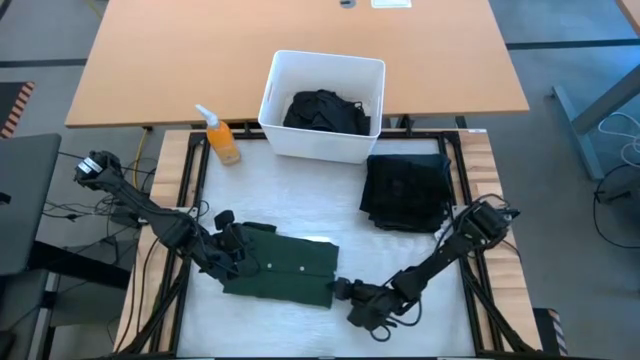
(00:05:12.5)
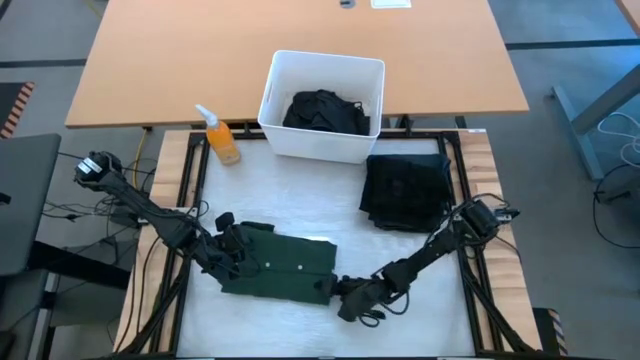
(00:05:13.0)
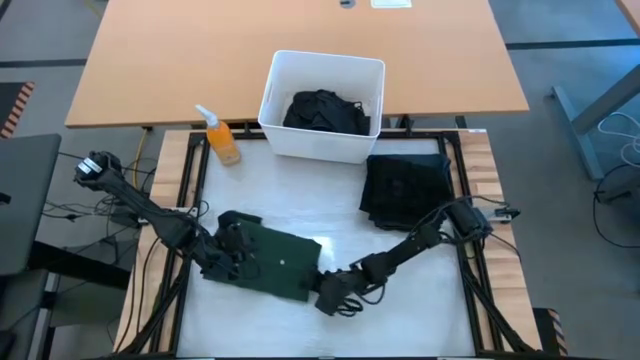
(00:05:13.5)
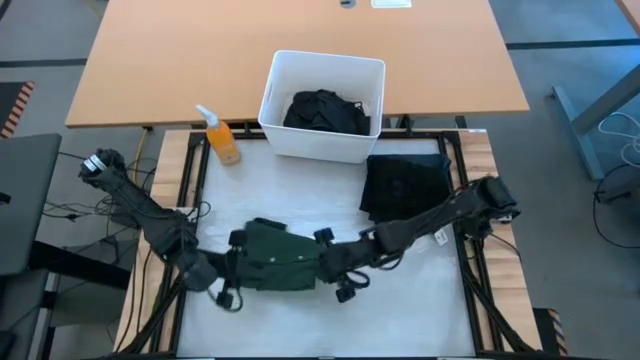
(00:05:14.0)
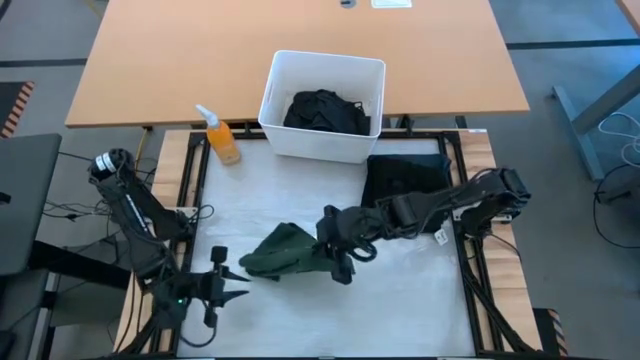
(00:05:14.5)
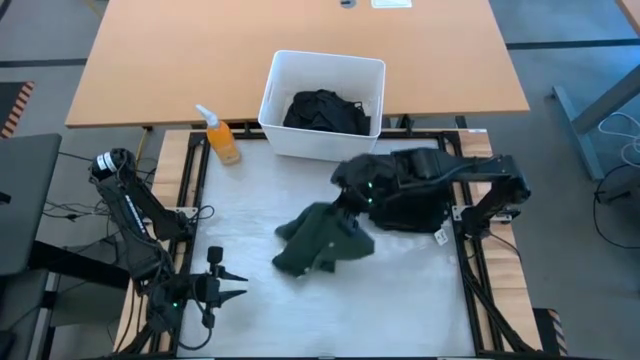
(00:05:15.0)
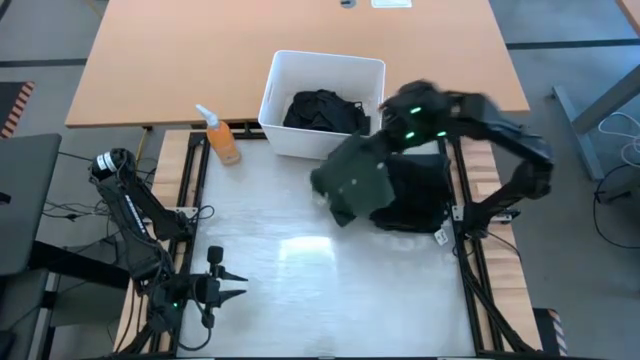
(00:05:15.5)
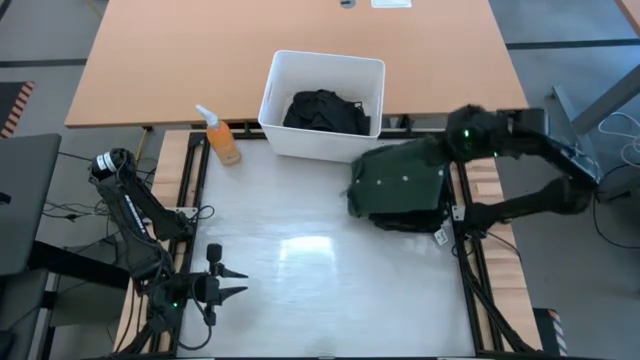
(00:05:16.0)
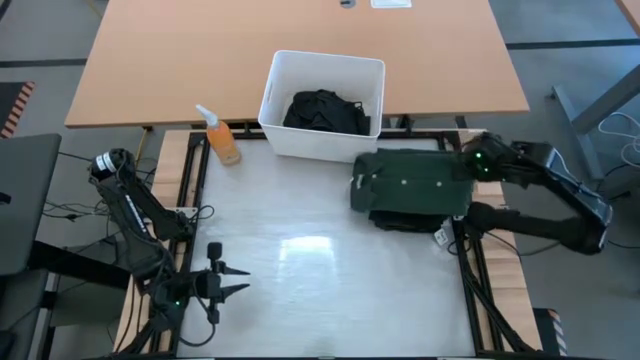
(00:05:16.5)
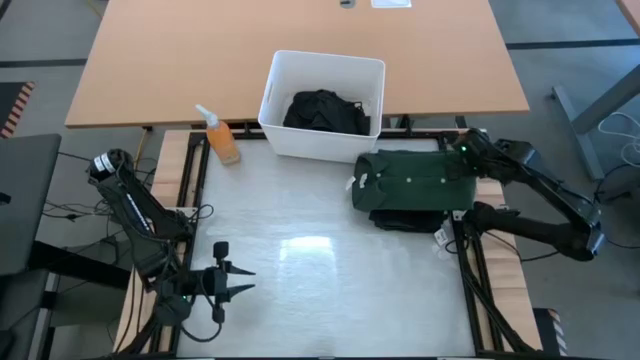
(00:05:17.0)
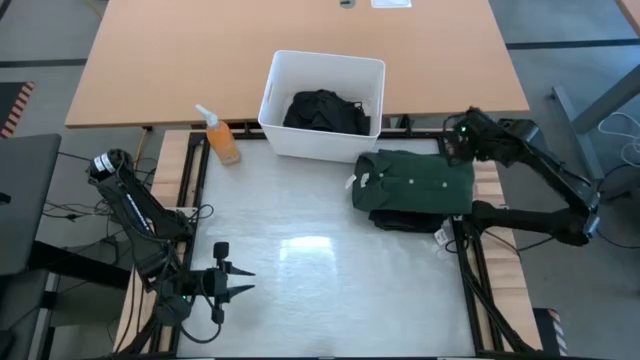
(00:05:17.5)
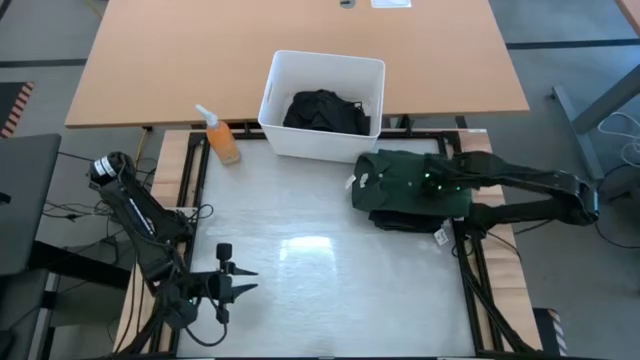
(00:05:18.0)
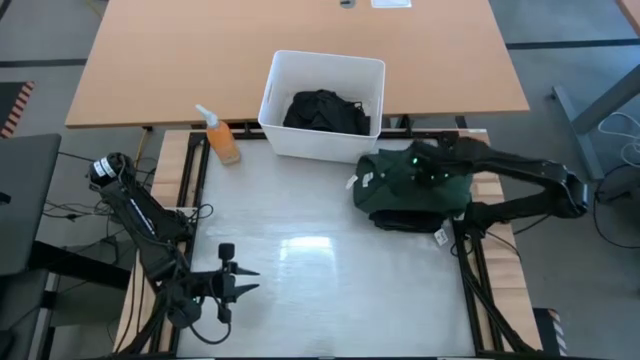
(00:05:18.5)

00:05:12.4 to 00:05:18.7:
Task: Fold laundry
Stack the folded green polo shirt on the black t-shirt

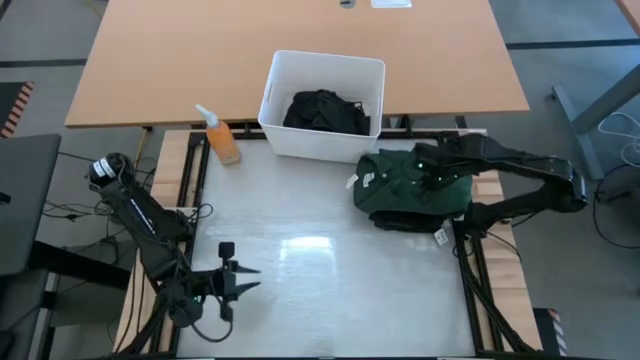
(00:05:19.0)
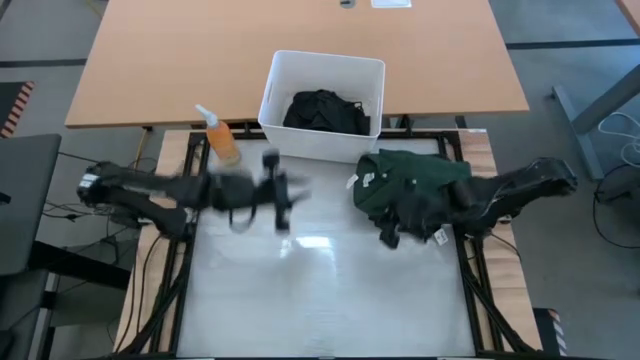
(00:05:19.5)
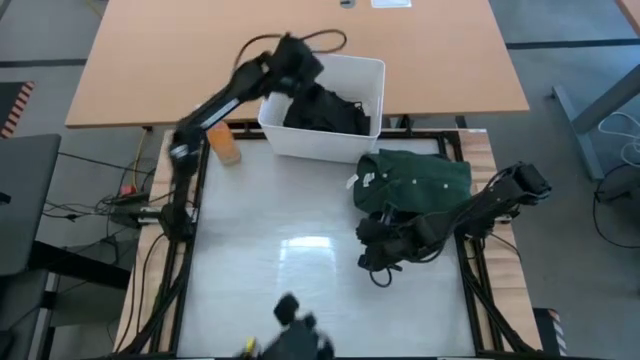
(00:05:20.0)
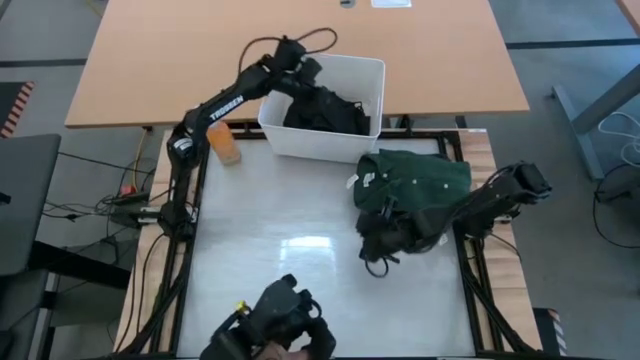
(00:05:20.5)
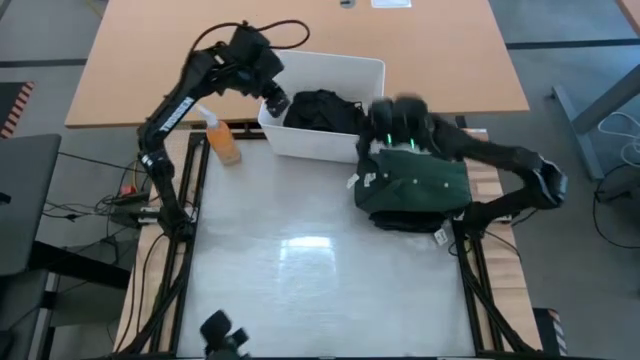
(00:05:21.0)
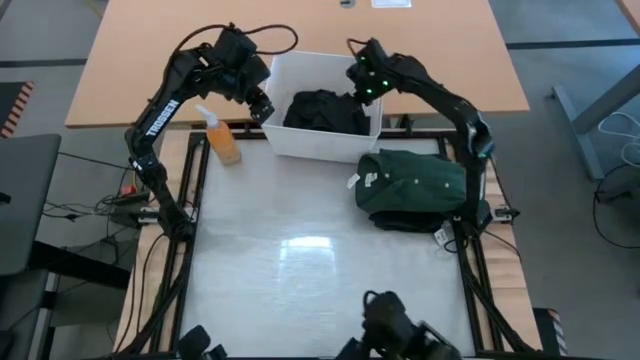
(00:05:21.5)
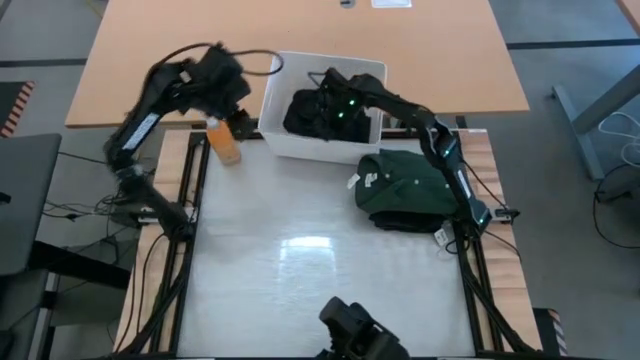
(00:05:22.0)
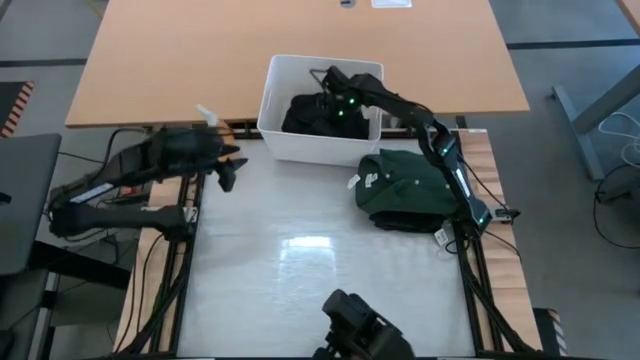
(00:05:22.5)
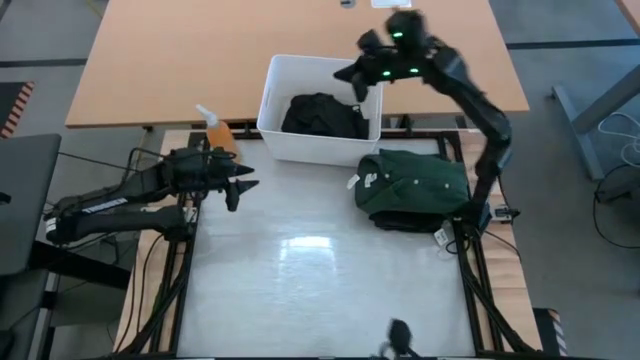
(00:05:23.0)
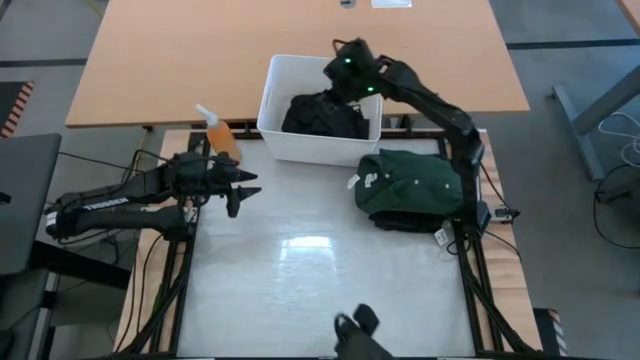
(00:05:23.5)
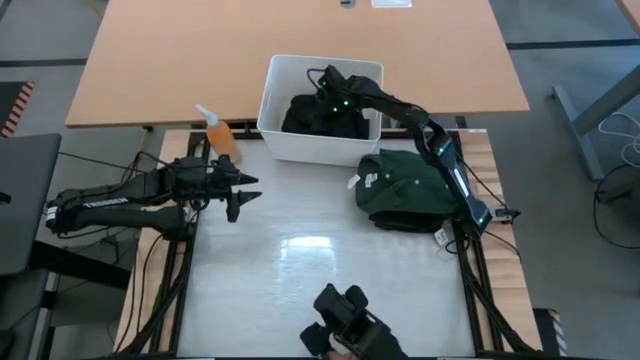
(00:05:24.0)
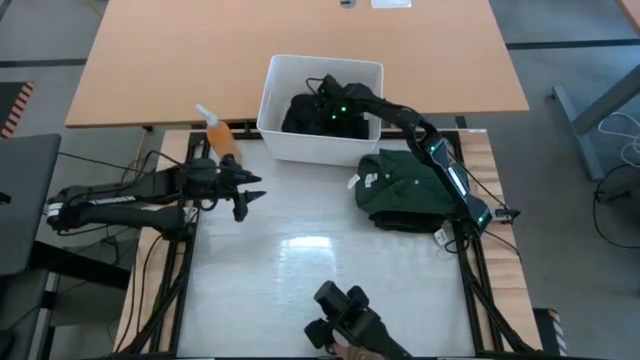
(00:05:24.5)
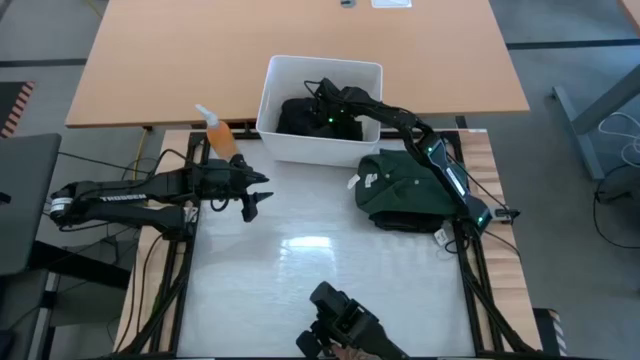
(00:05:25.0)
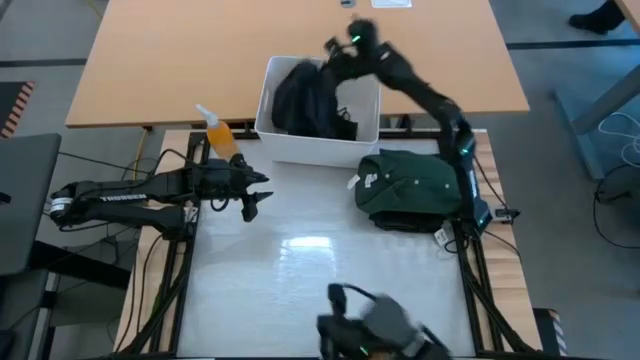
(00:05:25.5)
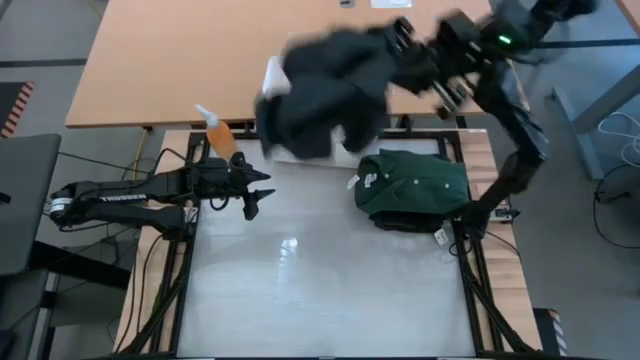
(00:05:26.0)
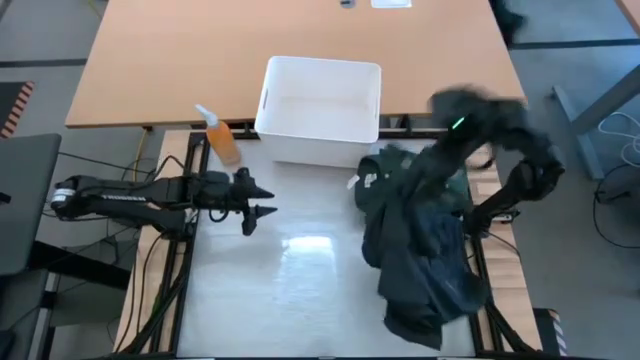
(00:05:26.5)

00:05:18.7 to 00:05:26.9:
Remove the black shorts from the white bin

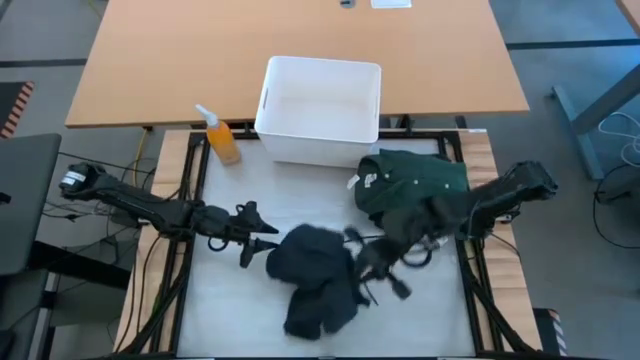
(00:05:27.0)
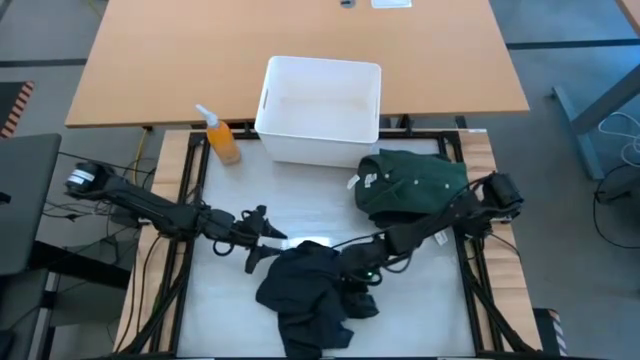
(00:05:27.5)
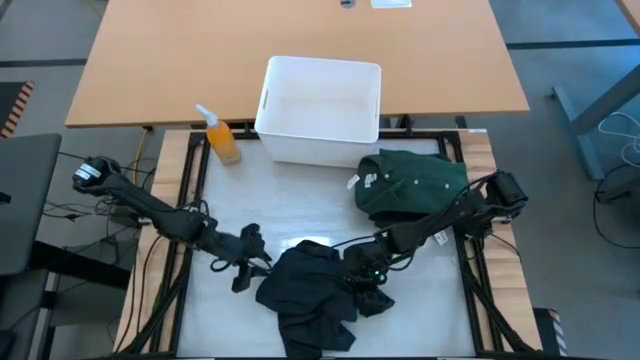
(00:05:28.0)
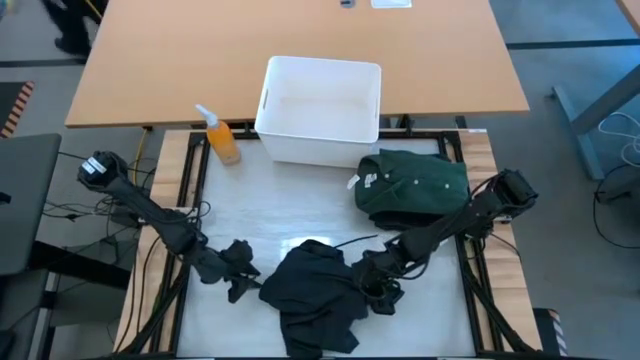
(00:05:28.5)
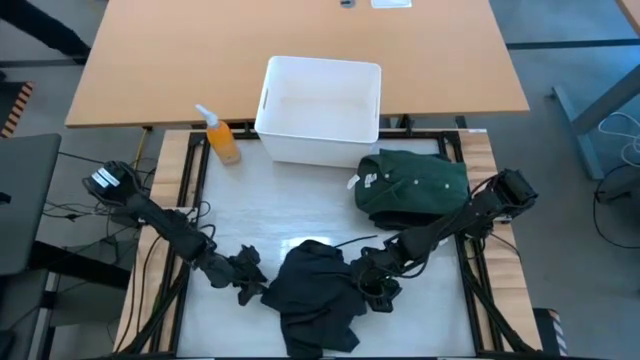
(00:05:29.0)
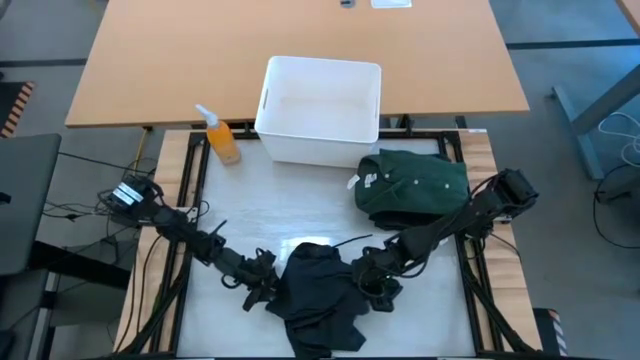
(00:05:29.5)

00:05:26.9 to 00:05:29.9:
Fold the black shorts
